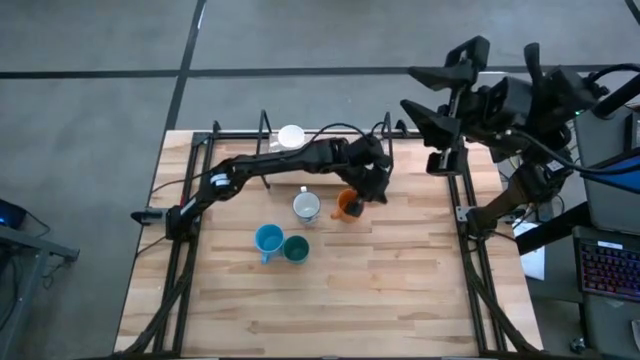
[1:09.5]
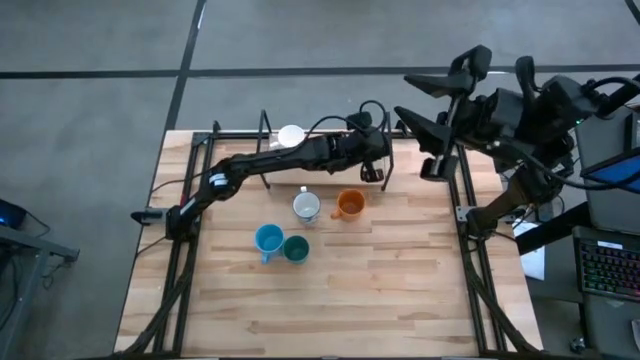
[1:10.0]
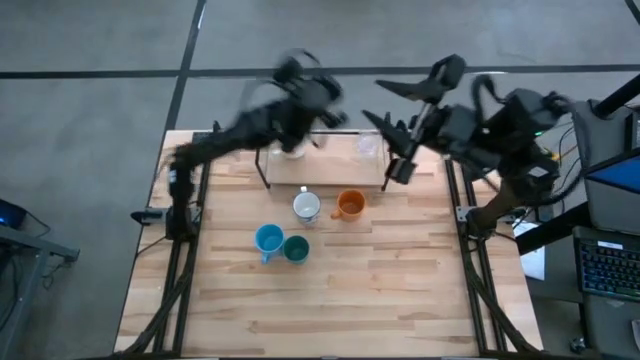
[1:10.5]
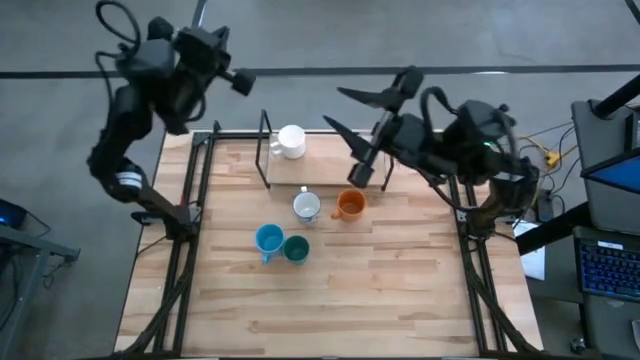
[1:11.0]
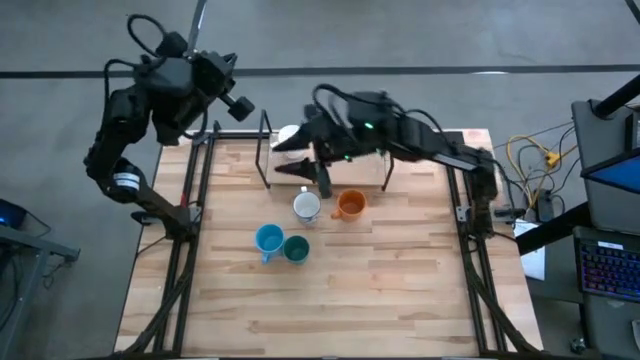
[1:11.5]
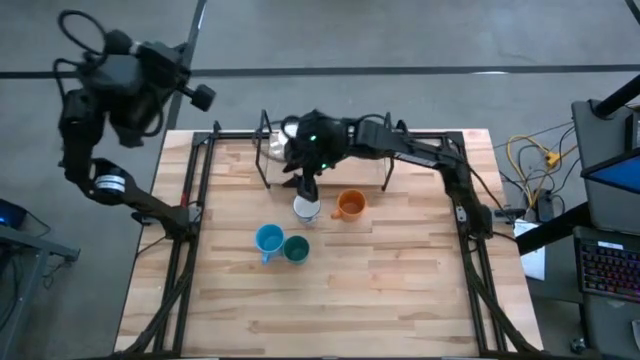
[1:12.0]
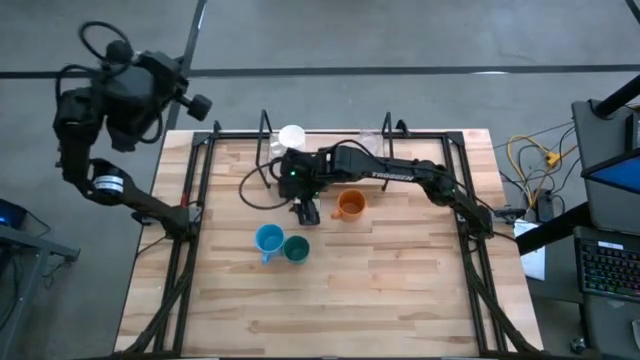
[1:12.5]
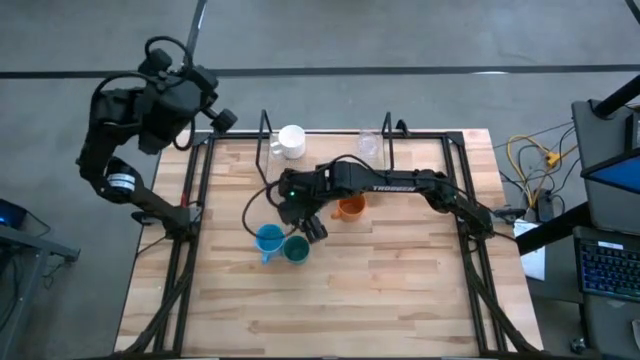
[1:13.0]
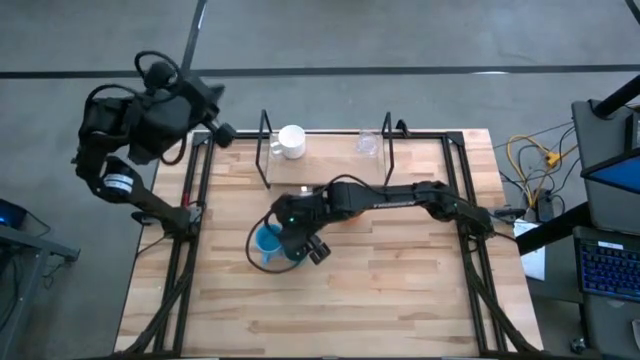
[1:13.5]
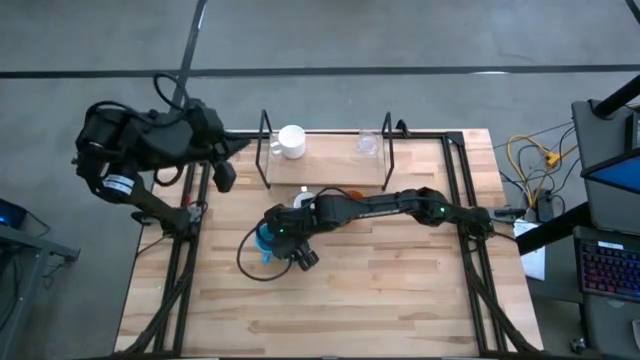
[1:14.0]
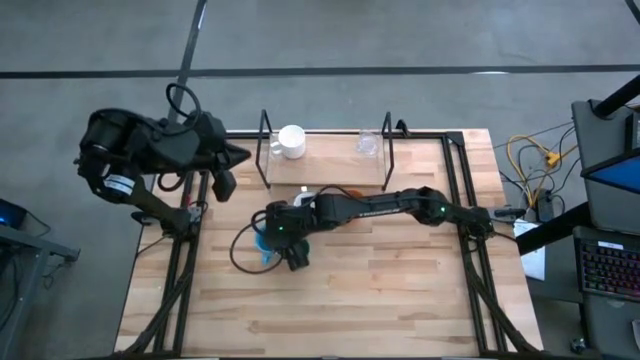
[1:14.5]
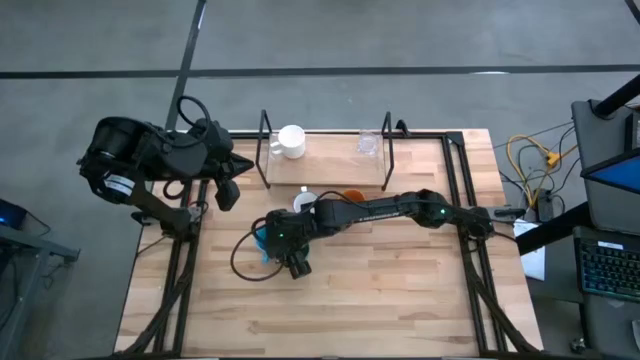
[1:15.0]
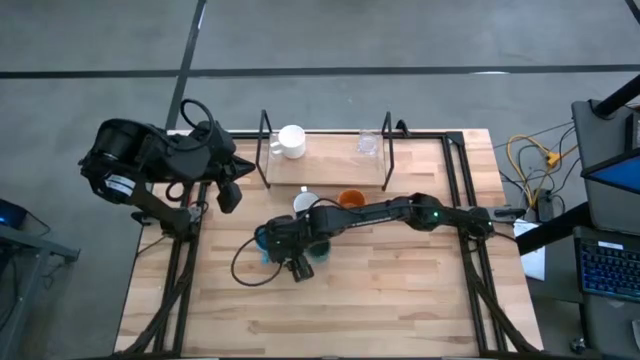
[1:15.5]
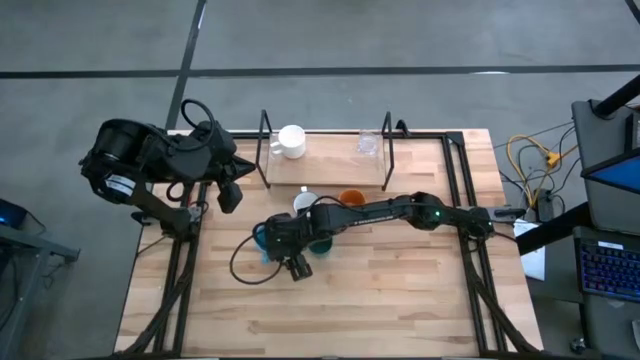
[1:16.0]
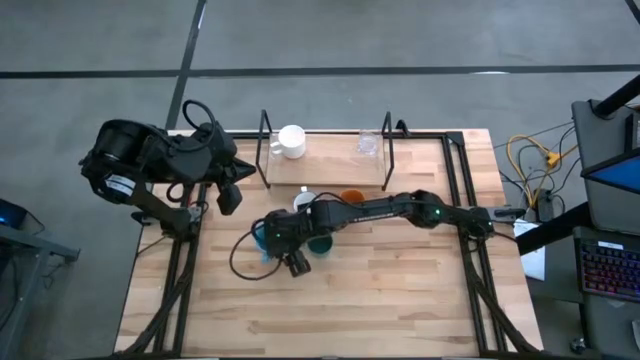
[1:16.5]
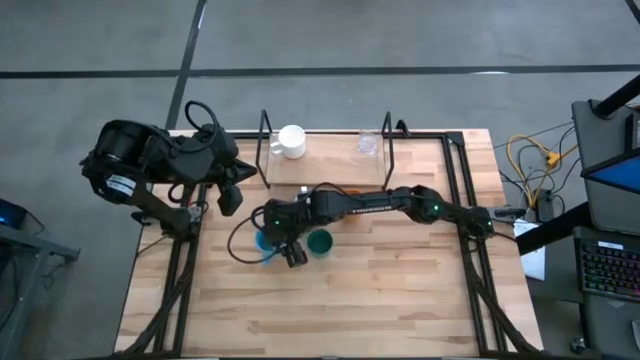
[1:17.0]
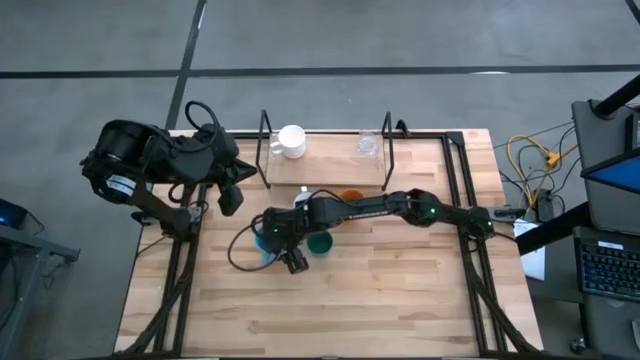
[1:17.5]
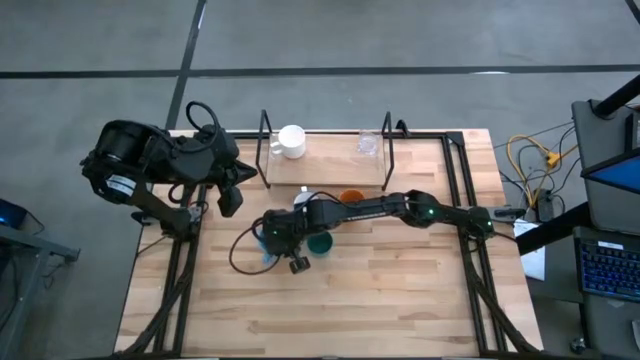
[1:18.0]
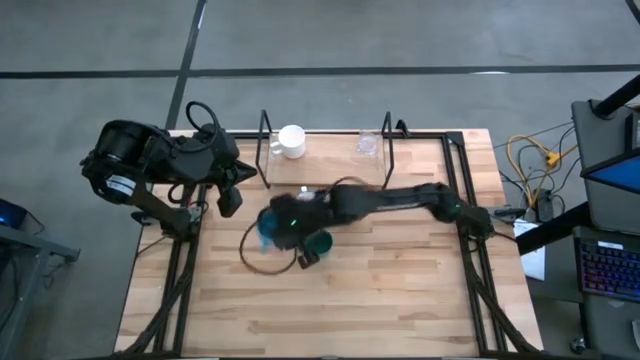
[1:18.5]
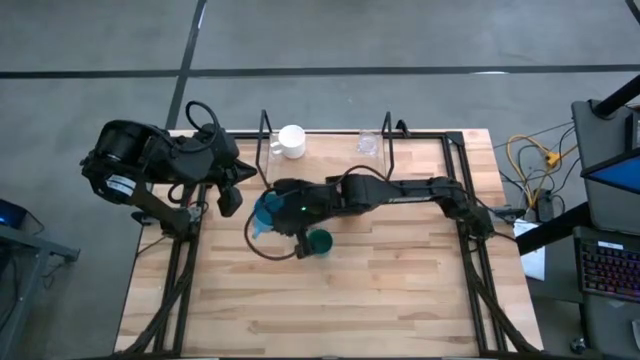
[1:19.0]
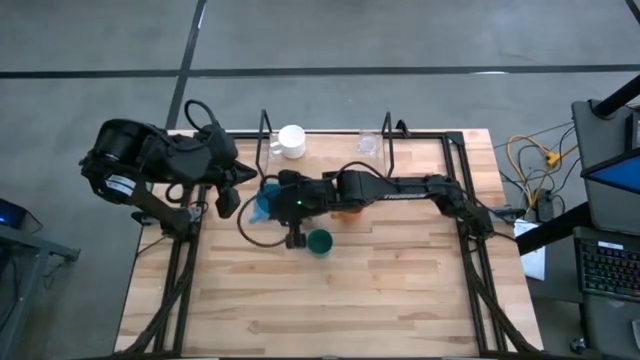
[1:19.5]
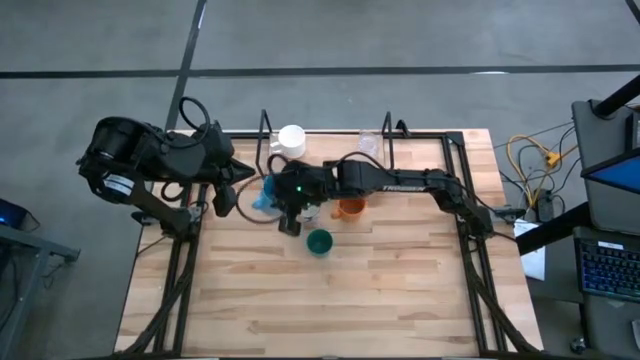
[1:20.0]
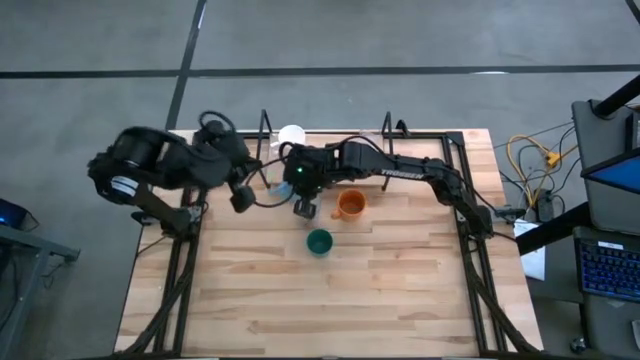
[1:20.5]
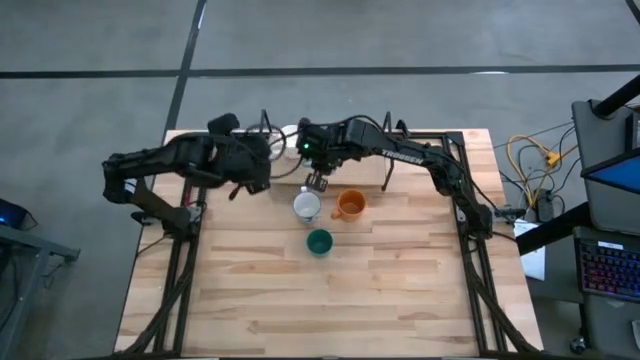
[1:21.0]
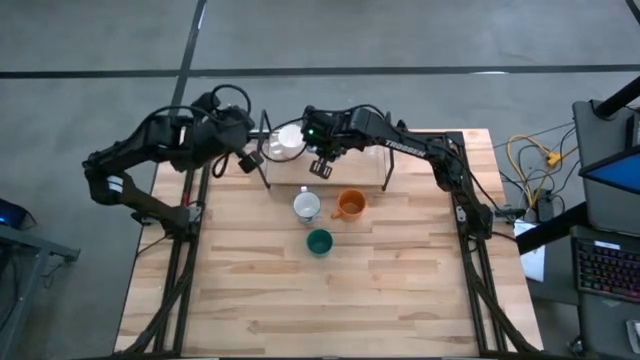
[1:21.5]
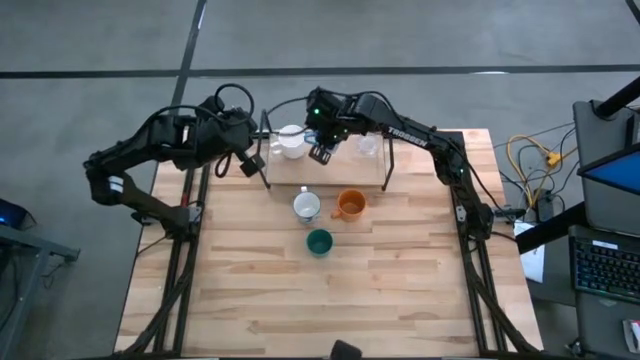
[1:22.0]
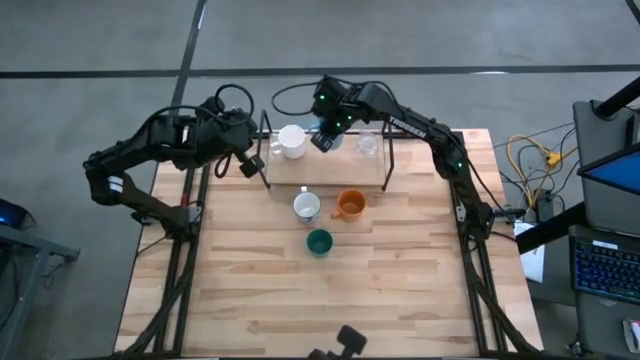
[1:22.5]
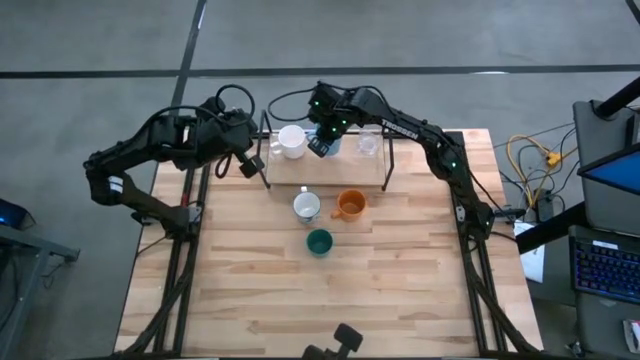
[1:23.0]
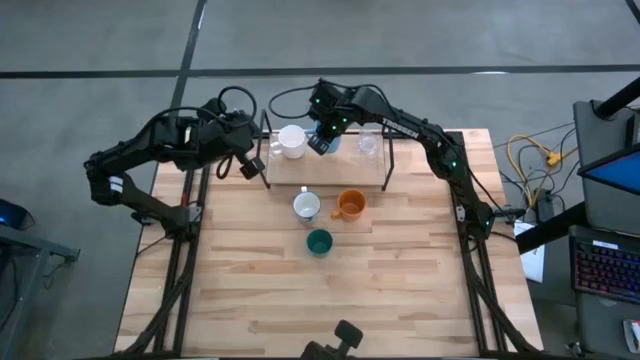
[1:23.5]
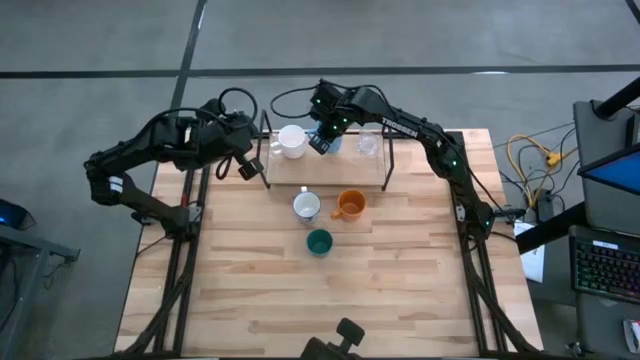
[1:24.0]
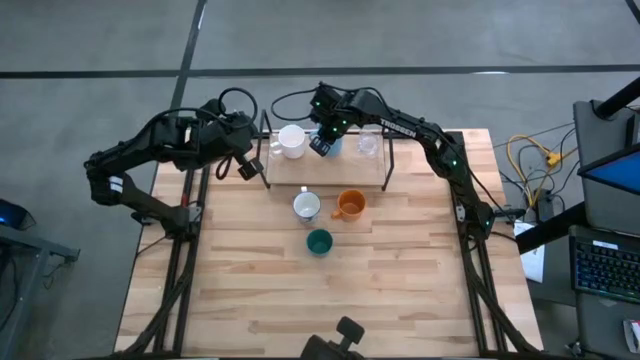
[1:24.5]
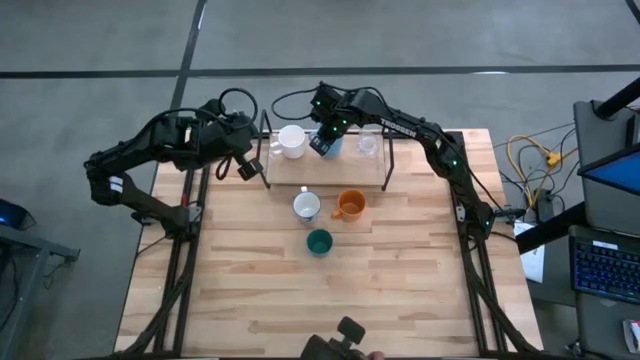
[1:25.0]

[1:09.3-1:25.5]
Task: Stack small to large cups/mugs on shelf
Put the light blue mug on the shelf

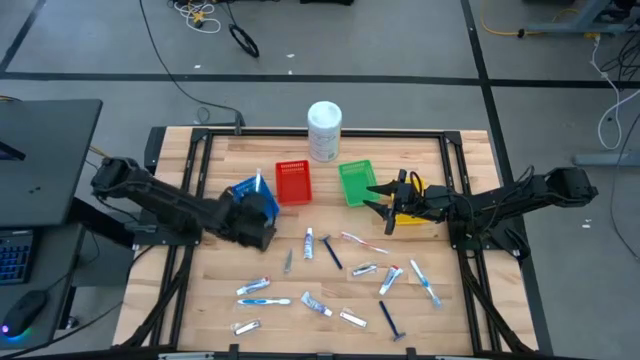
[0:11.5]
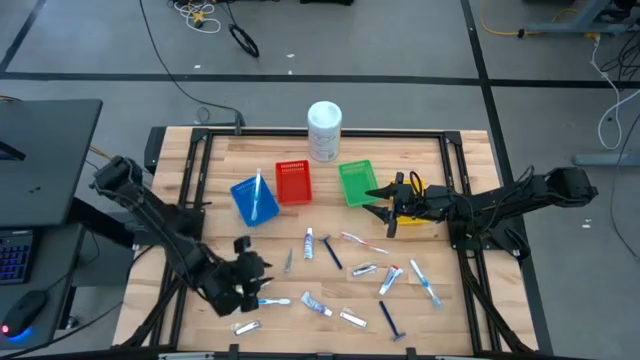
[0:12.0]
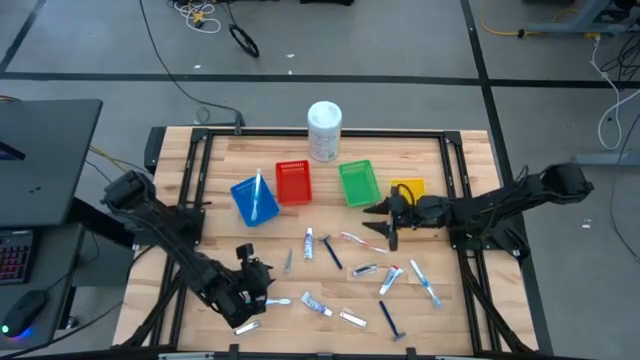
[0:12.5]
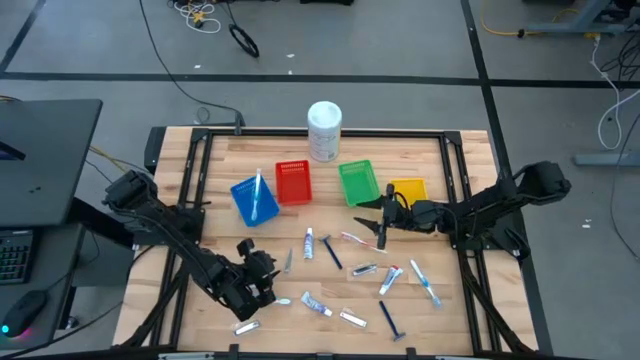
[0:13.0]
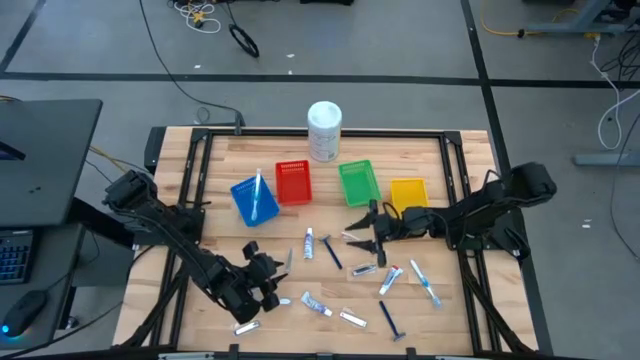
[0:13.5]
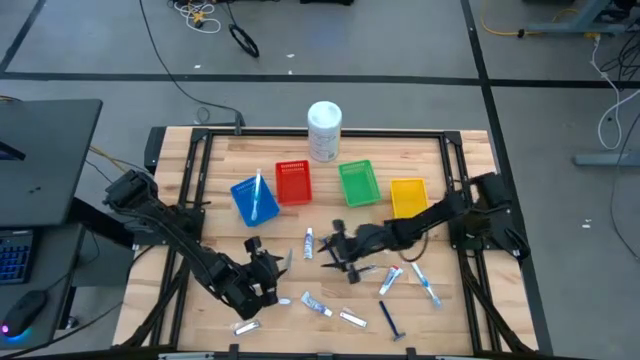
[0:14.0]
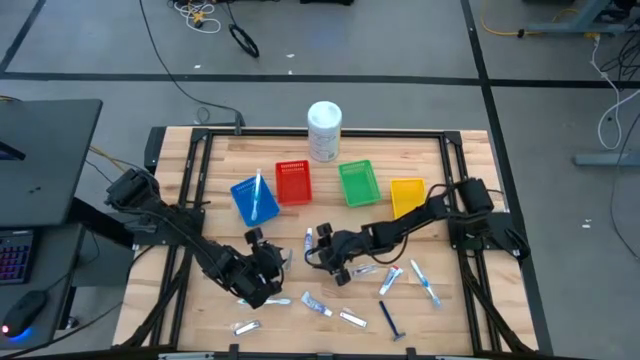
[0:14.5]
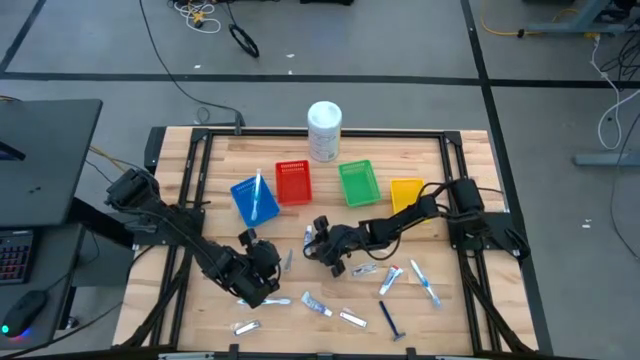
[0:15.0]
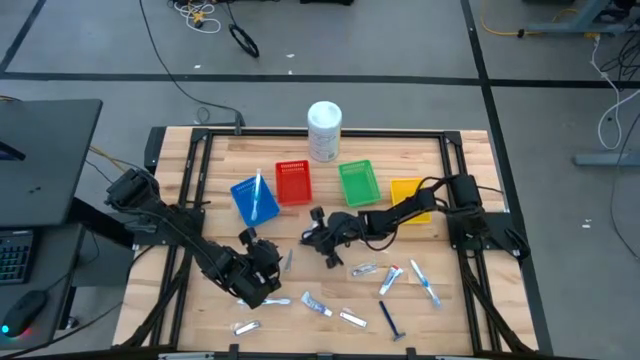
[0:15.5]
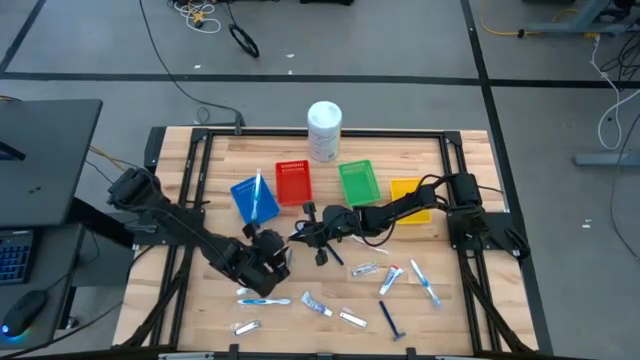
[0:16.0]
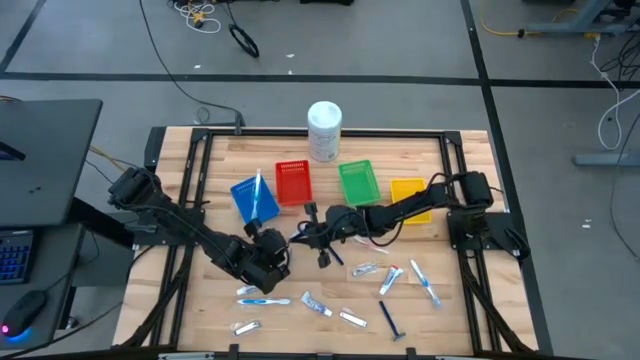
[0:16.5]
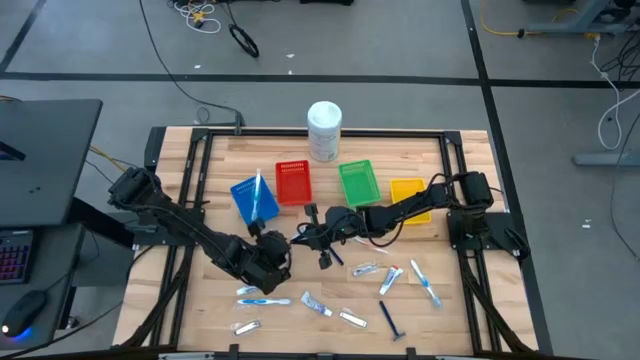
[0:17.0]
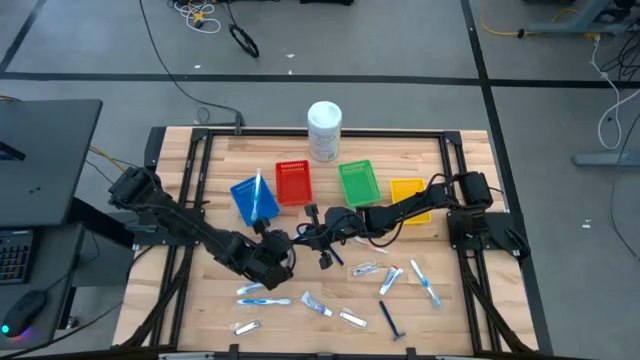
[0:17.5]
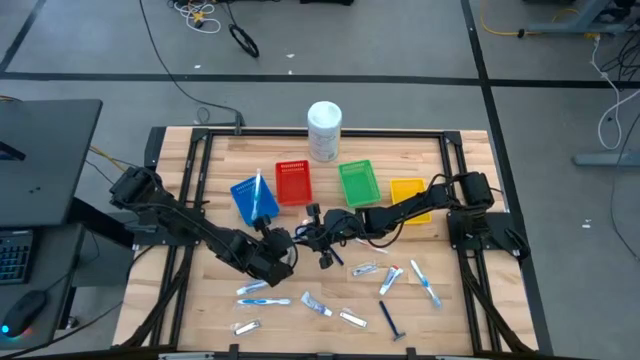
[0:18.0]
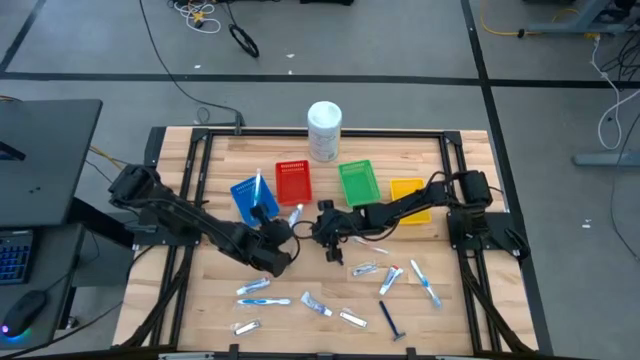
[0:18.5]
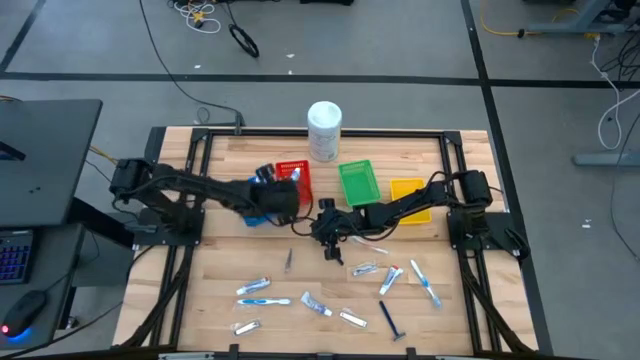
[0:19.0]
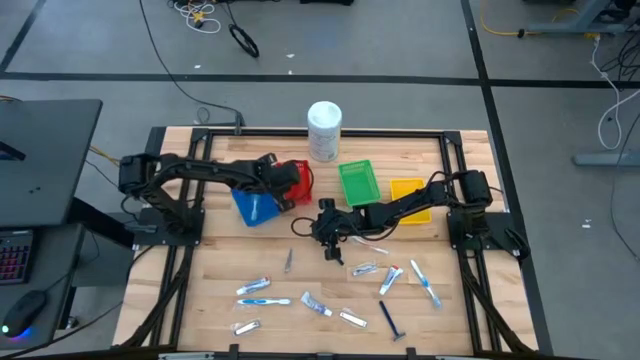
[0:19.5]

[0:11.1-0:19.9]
Task: Pick & Place Travel size toiletries
Put the white toothpaste into the red bin
